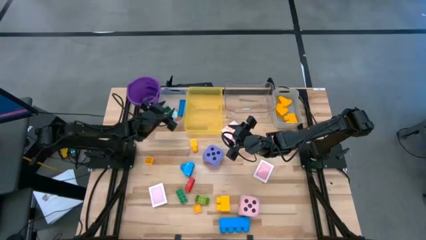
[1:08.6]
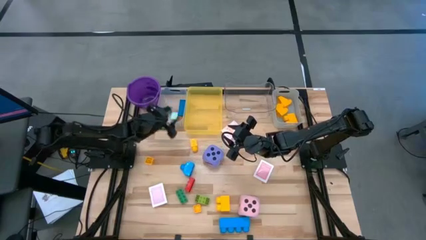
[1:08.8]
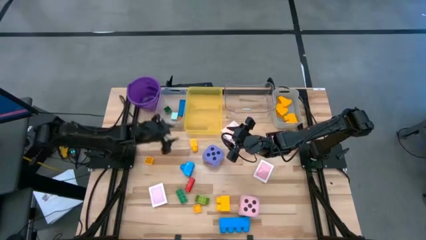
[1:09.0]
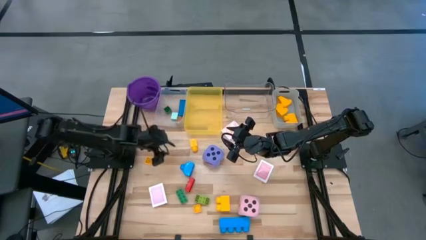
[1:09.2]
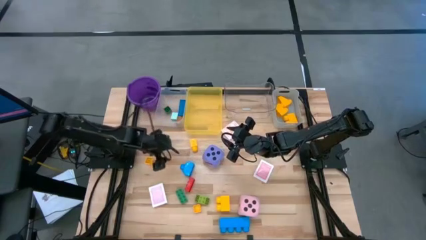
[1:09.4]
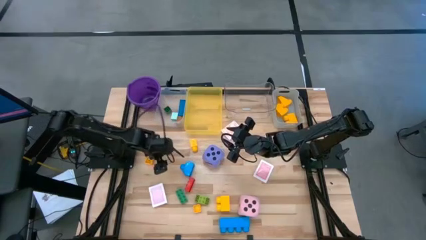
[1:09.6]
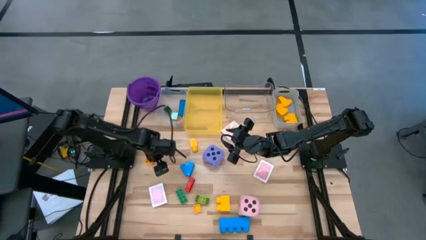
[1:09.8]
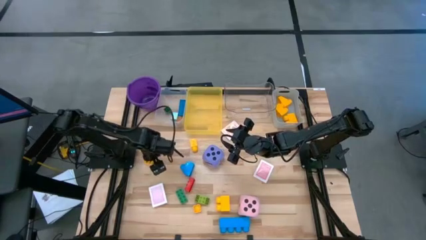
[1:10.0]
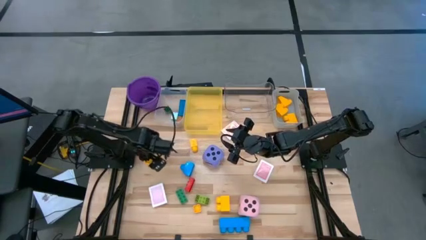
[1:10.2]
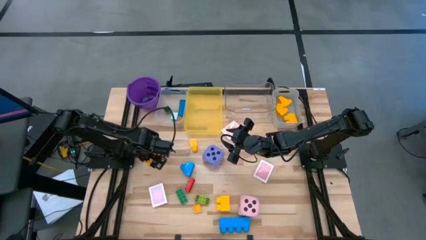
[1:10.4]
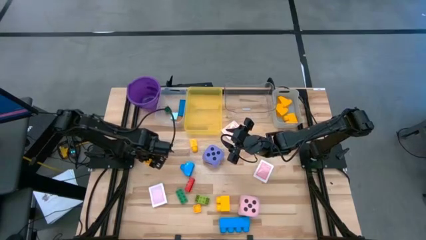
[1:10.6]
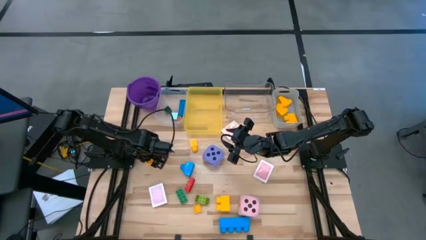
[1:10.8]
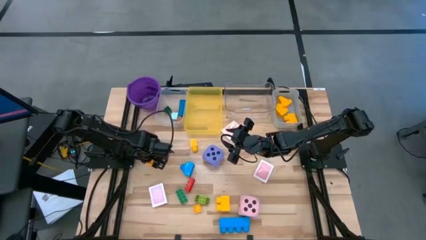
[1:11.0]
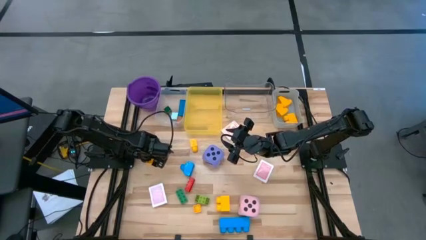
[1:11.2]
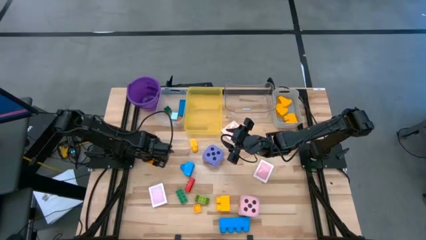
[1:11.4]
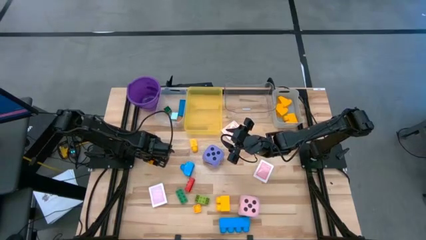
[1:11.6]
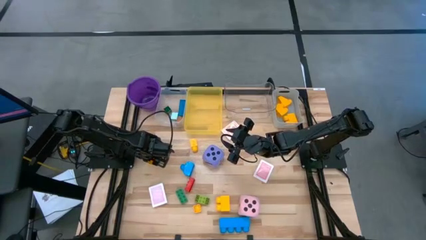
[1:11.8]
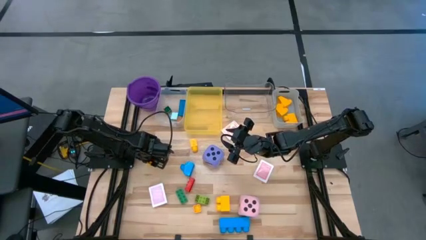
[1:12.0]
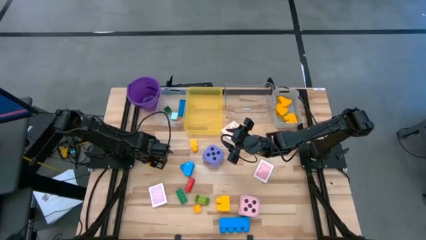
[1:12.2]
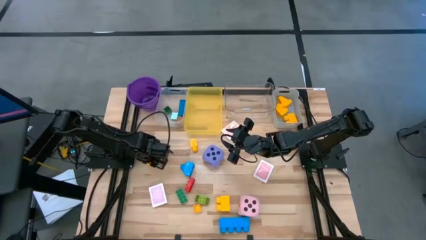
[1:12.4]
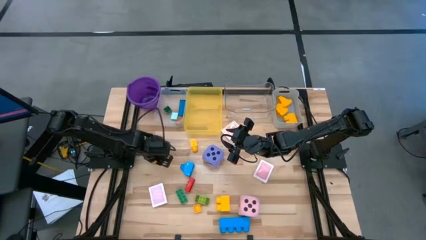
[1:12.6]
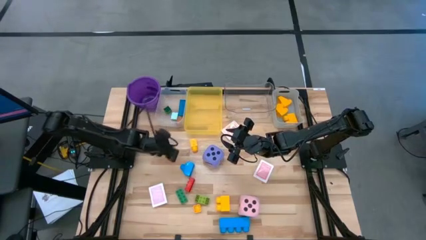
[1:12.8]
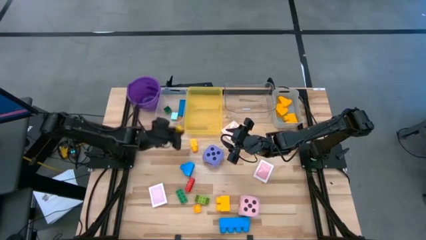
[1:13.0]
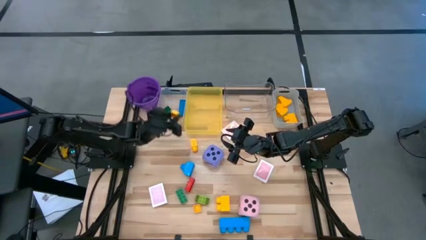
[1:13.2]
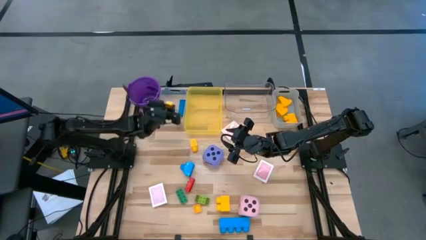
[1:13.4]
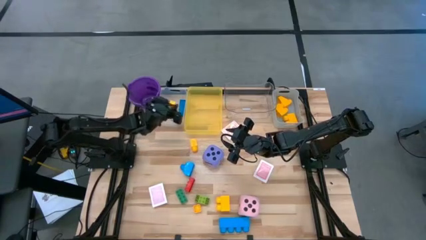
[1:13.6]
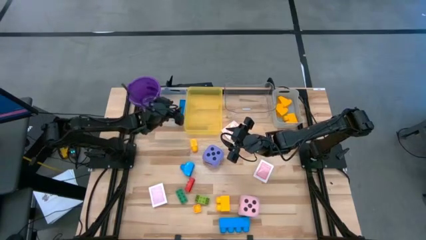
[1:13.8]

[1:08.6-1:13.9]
Task: Pick & Place Toys
Put the small yellow game piece into the white bin

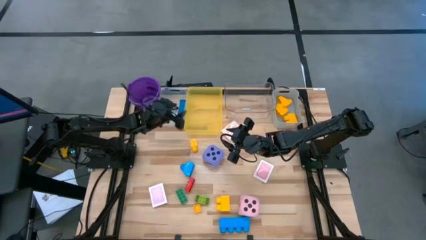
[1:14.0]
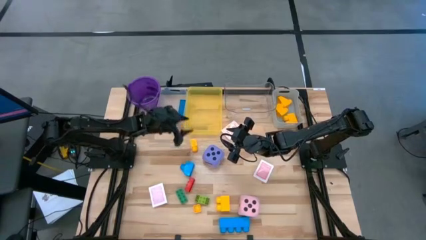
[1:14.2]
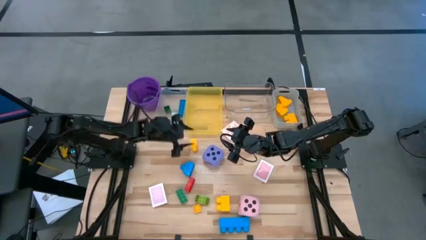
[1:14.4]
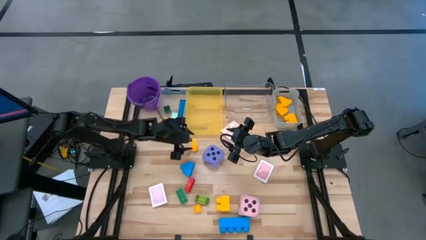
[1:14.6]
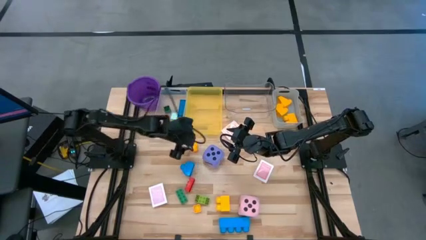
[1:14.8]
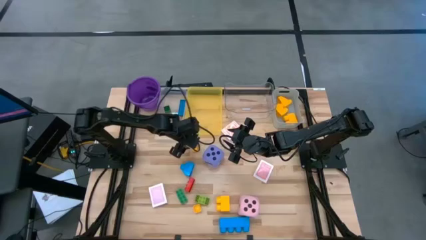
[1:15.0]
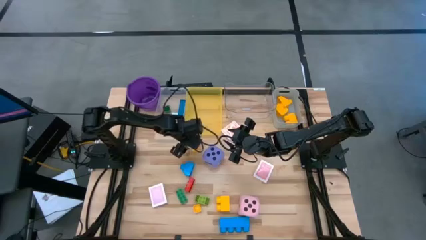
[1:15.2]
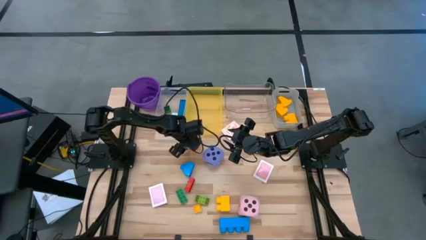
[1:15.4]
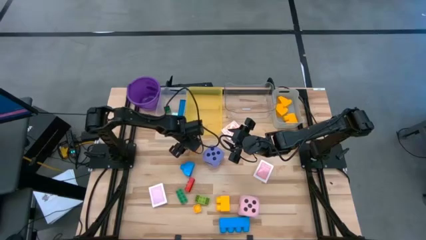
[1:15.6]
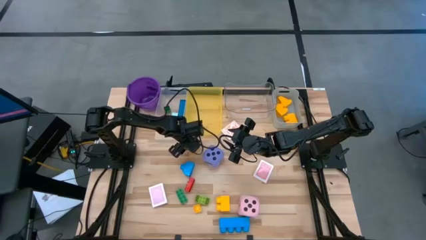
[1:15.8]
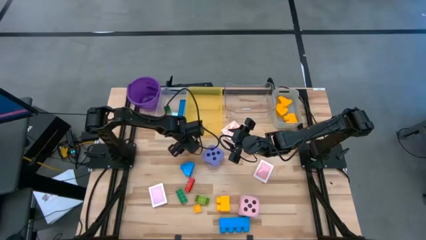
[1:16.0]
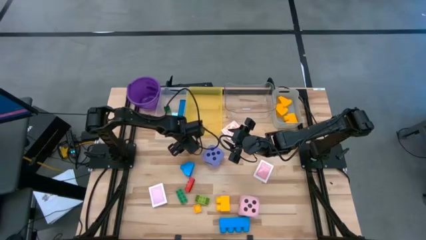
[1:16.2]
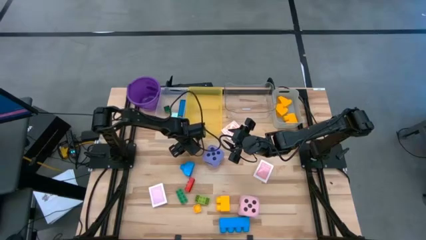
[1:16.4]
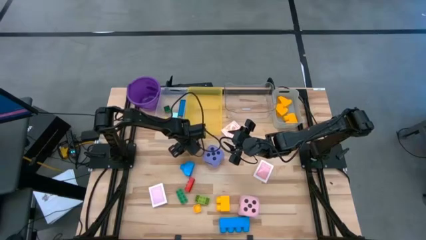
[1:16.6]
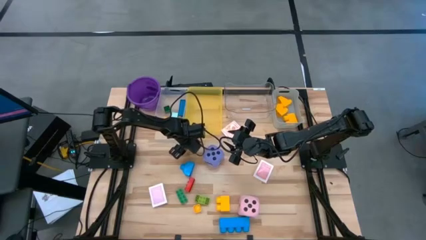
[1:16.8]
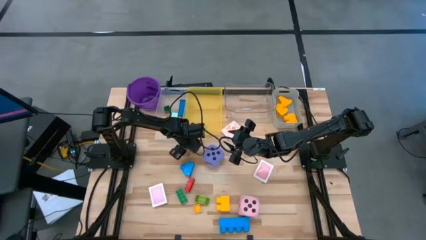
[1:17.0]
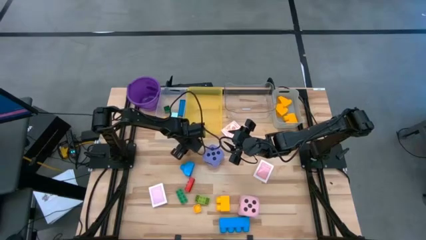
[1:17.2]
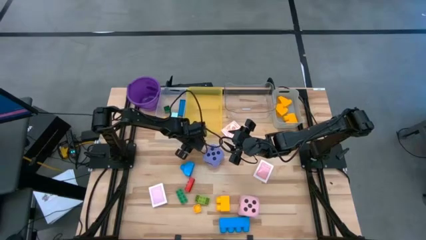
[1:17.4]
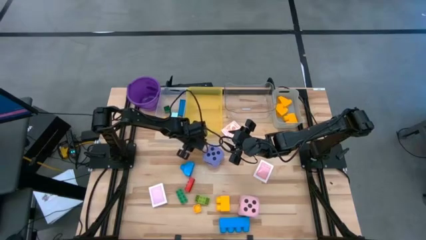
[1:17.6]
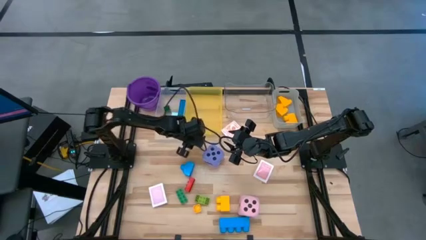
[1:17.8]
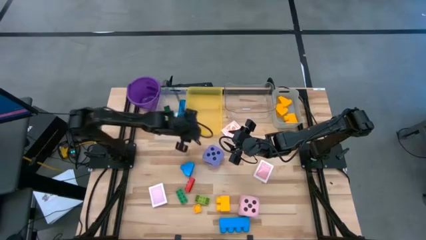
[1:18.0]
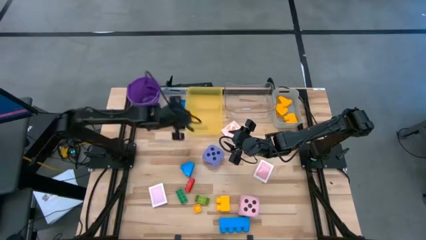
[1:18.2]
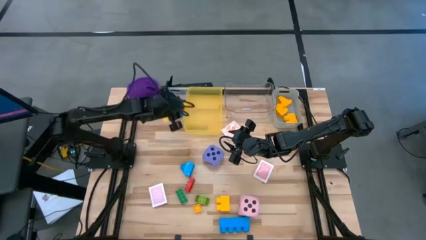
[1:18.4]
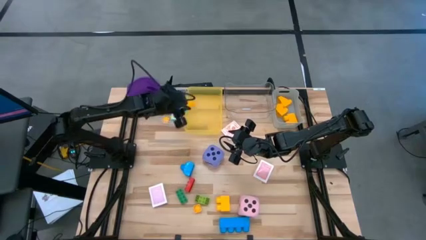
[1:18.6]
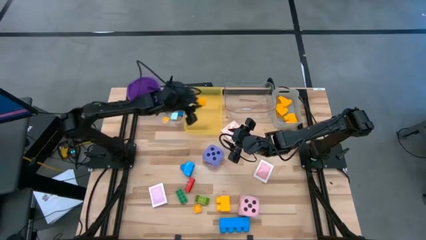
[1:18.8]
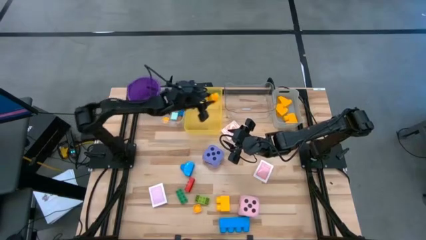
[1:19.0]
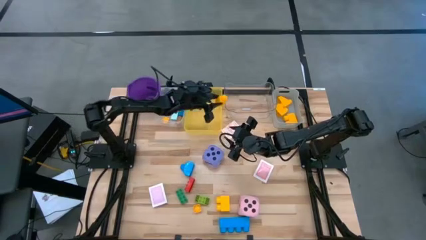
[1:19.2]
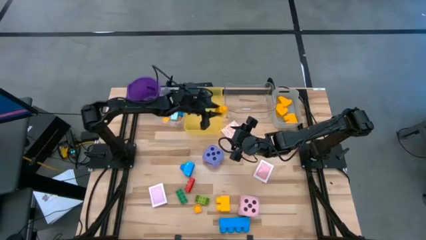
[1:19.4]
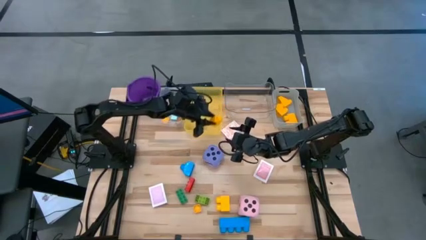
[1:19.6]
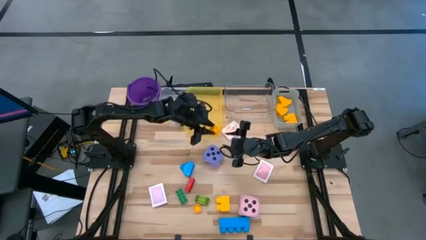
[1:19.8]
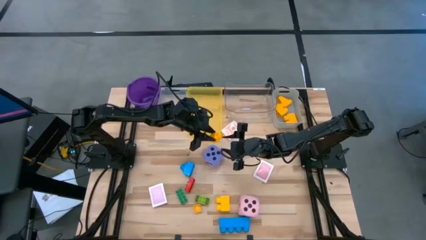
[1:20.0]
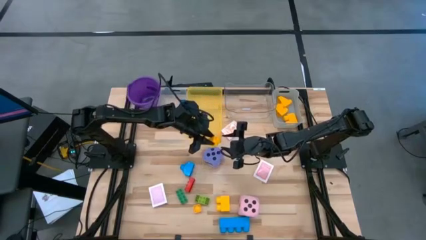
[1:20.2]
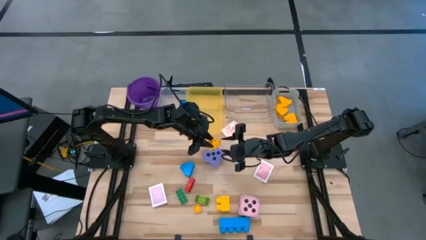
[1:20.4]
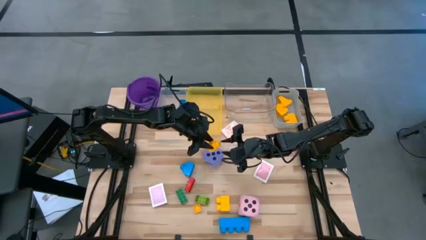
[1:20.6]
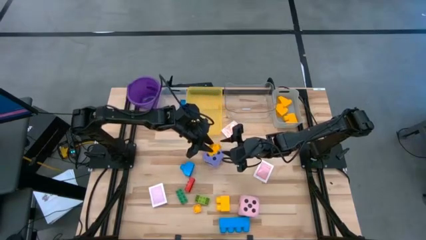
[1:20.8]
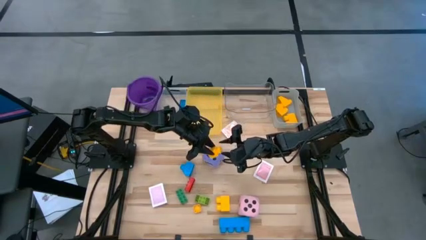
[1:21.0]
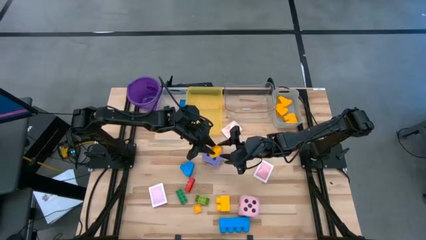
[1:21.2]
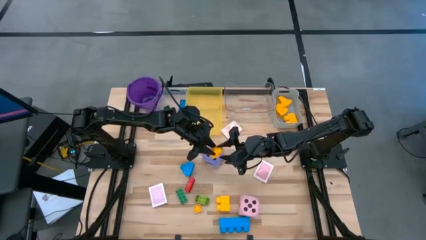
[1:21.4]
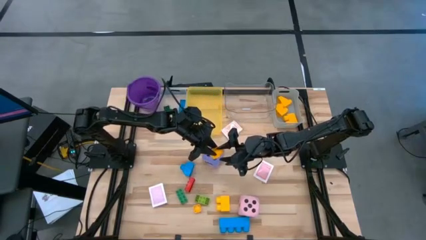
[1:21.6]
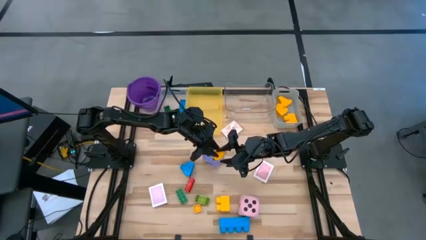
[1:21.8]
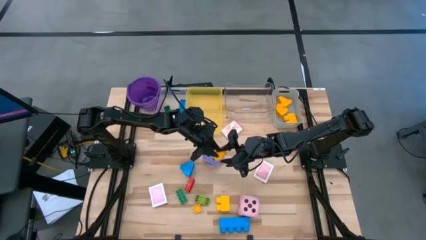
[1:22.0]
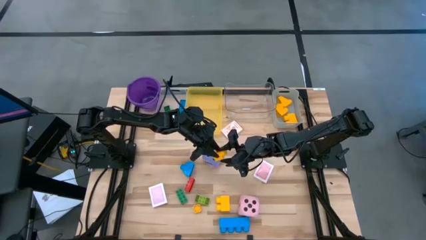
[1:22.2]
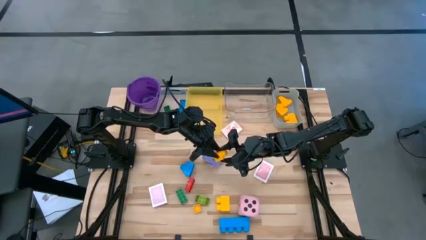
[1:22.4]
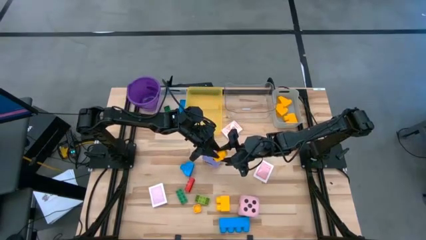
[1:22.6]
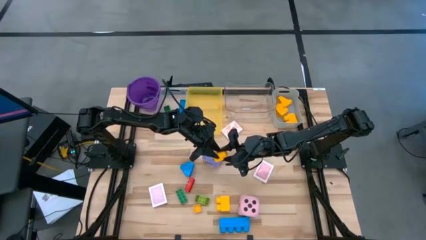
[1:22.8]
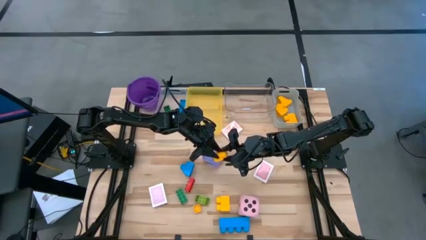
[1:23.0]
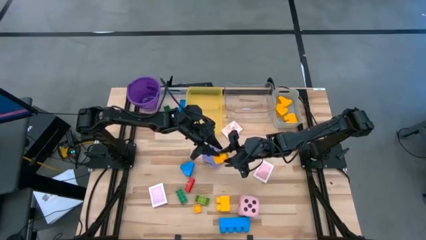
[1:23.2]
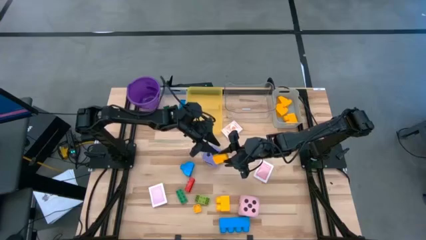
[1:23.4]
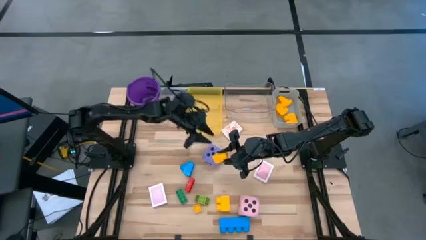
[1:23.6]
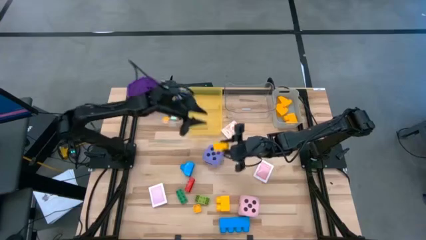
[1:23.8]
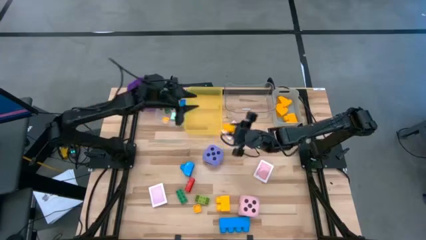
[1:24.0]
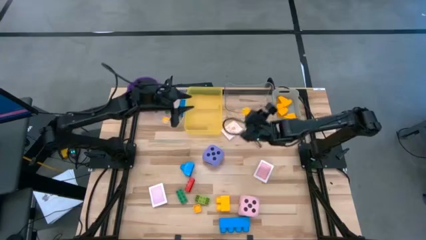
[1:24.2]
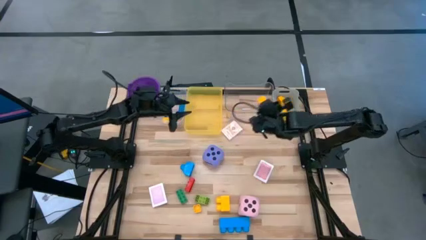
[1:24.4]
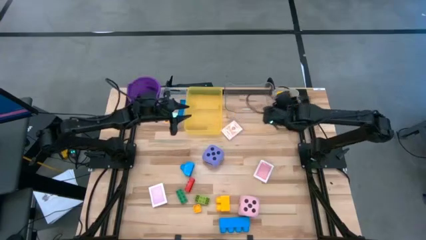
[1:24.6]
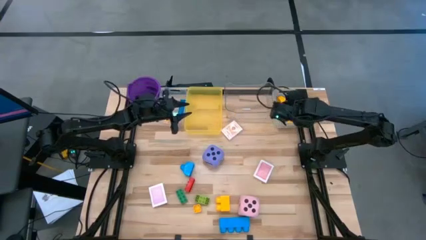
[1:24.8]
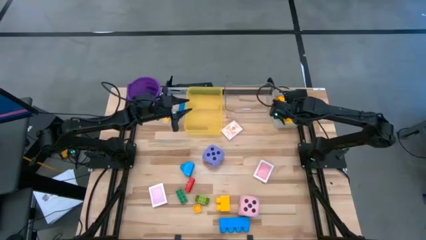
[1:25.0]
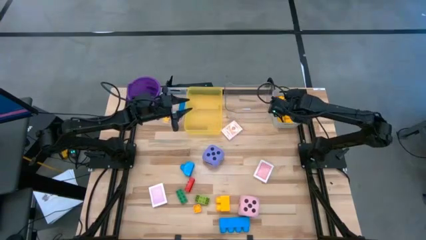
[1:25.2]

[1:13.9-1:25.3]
Put the large yellow game piece into the gray bin
